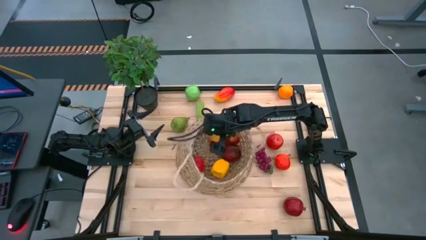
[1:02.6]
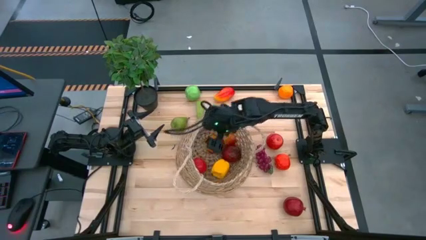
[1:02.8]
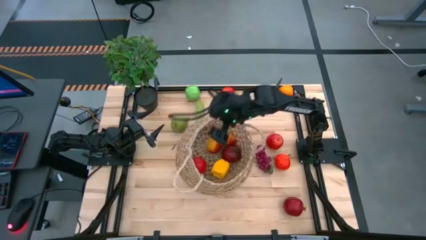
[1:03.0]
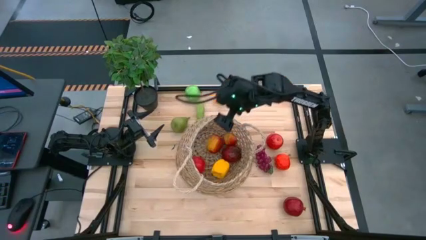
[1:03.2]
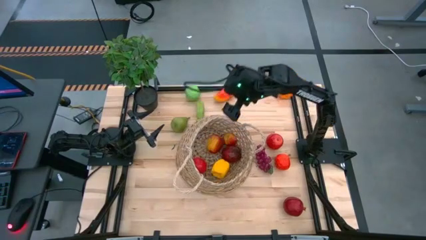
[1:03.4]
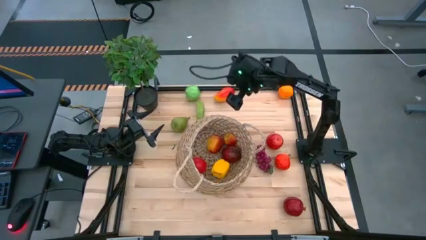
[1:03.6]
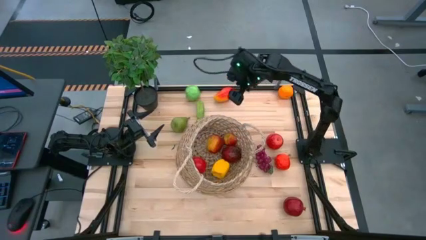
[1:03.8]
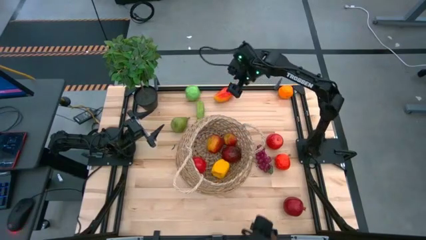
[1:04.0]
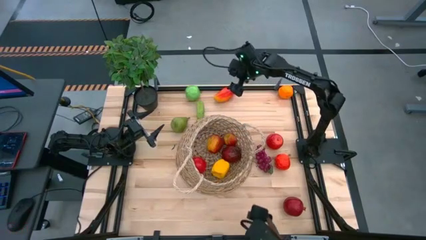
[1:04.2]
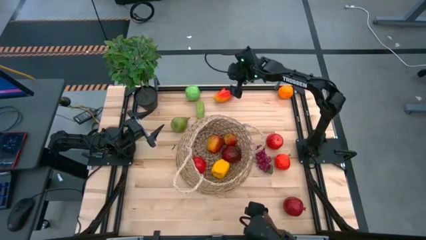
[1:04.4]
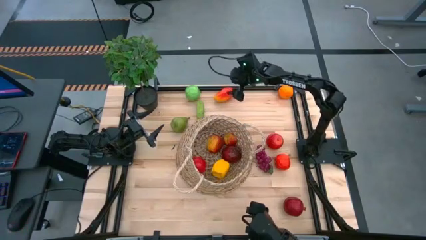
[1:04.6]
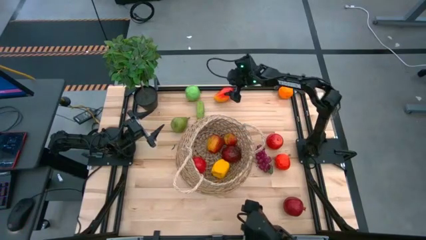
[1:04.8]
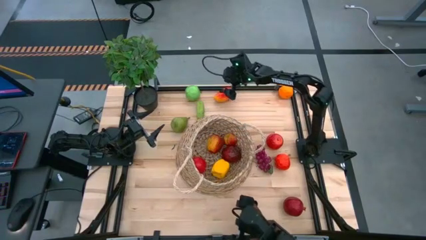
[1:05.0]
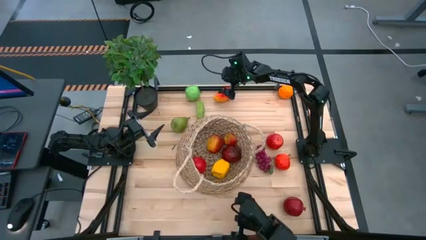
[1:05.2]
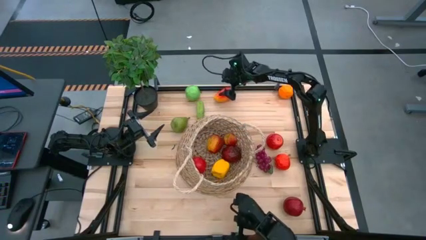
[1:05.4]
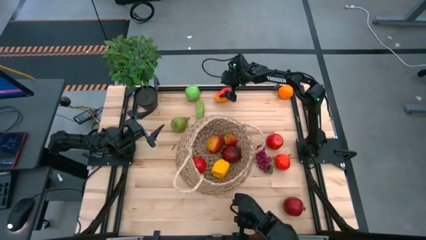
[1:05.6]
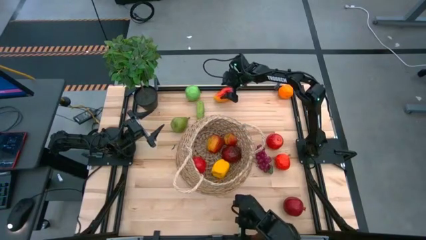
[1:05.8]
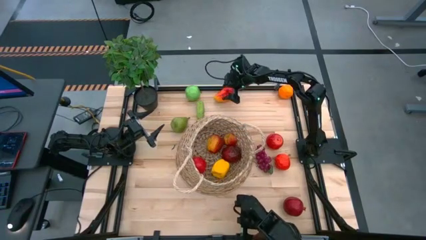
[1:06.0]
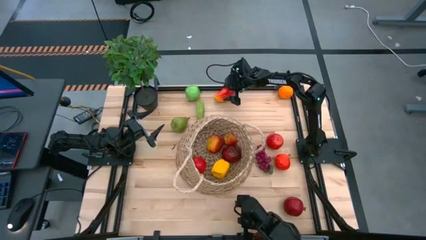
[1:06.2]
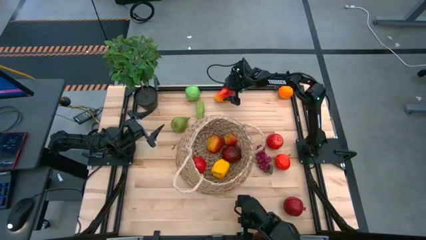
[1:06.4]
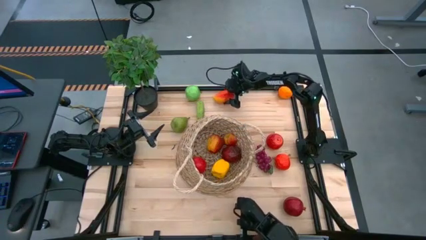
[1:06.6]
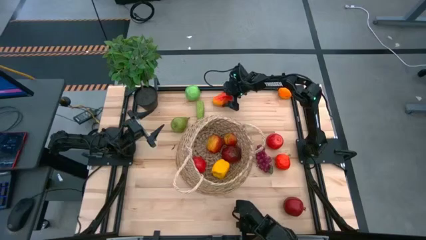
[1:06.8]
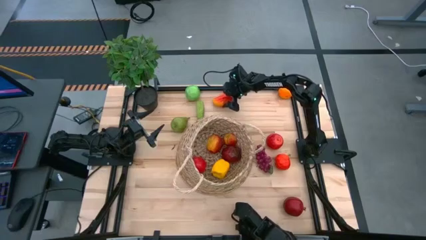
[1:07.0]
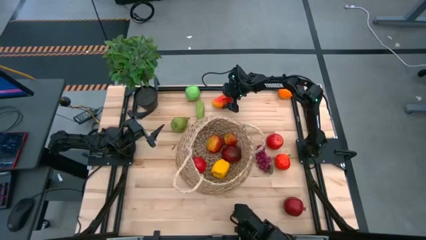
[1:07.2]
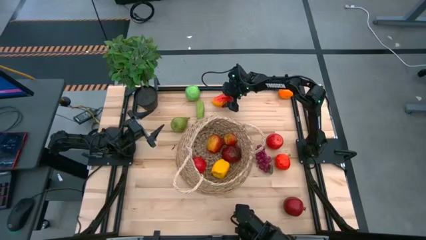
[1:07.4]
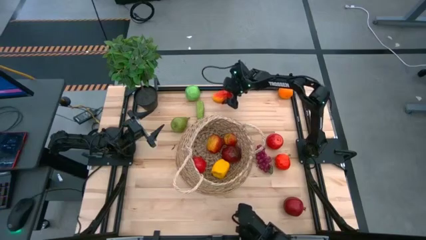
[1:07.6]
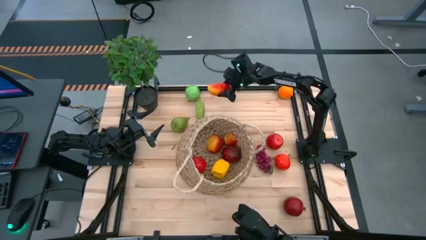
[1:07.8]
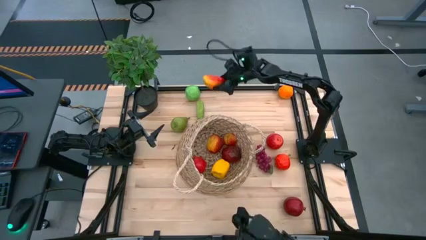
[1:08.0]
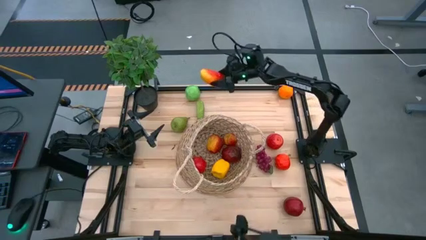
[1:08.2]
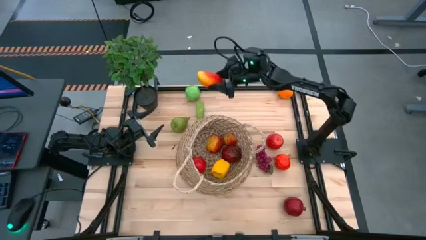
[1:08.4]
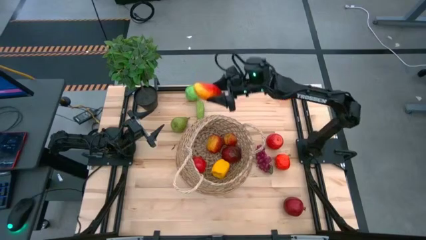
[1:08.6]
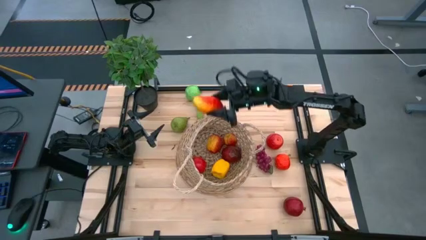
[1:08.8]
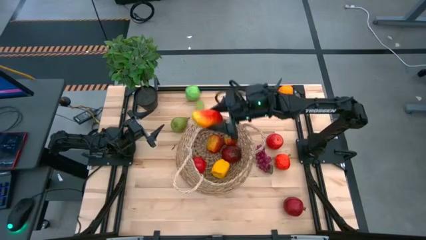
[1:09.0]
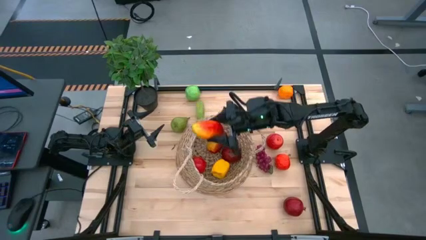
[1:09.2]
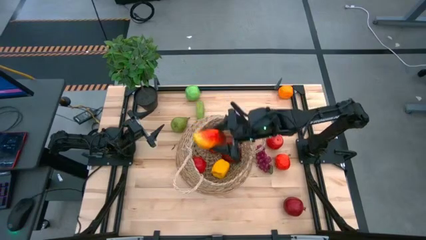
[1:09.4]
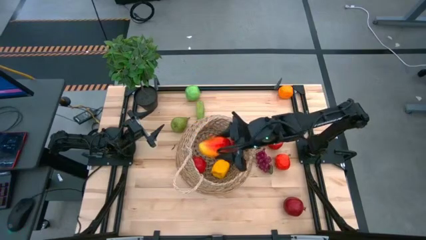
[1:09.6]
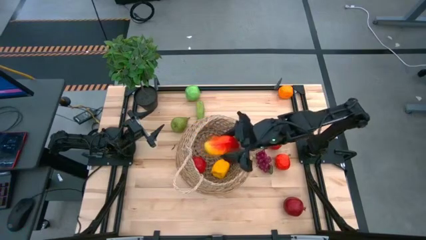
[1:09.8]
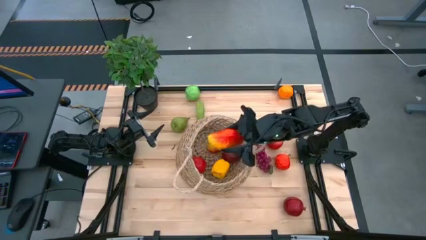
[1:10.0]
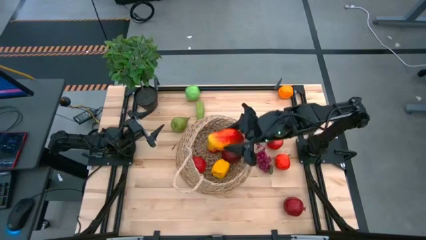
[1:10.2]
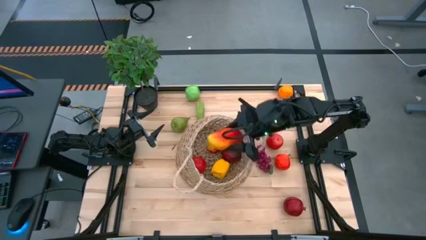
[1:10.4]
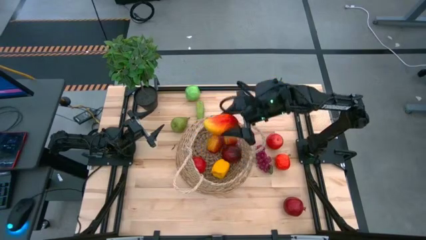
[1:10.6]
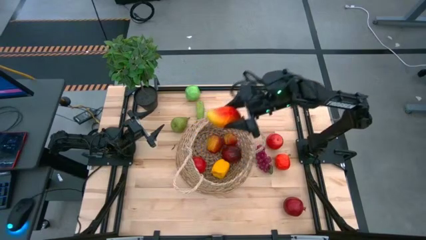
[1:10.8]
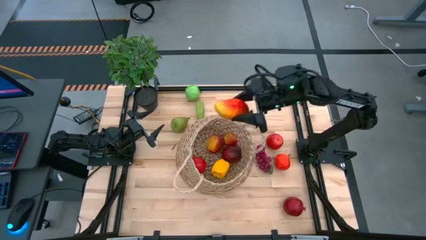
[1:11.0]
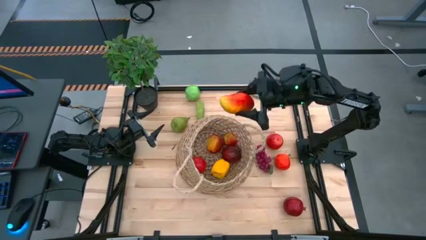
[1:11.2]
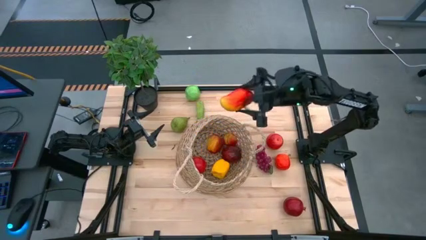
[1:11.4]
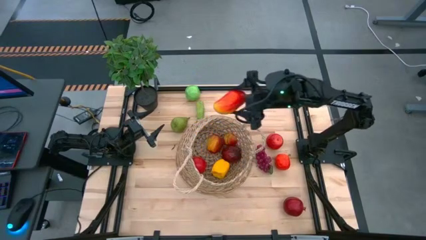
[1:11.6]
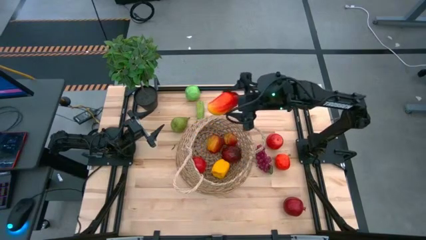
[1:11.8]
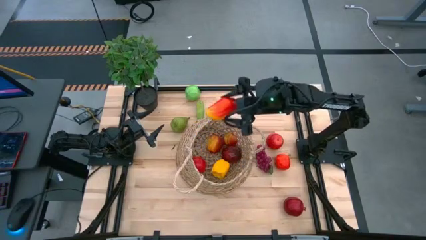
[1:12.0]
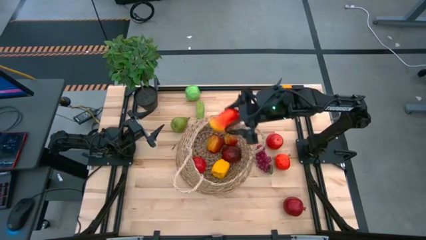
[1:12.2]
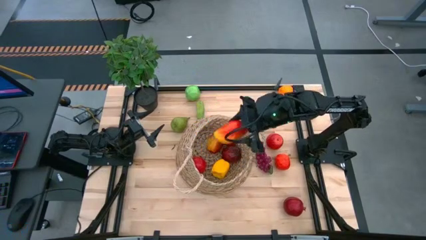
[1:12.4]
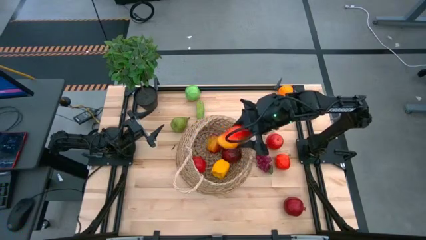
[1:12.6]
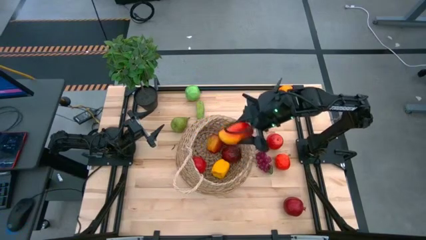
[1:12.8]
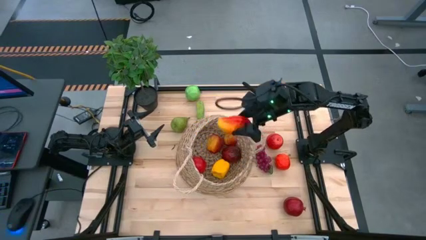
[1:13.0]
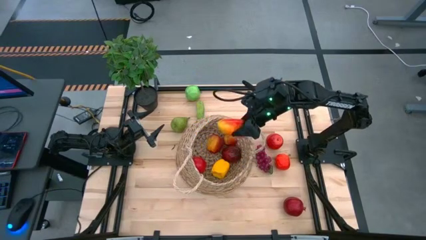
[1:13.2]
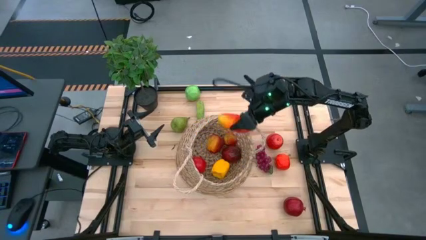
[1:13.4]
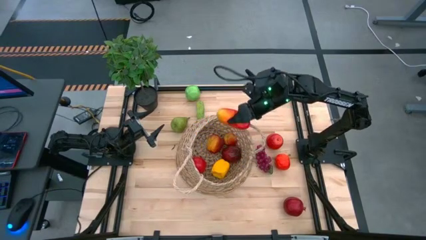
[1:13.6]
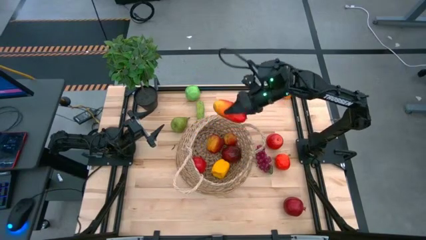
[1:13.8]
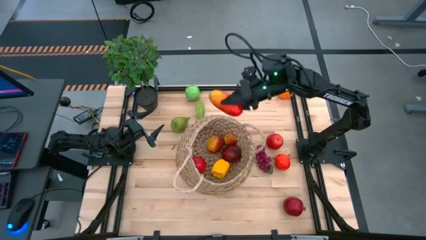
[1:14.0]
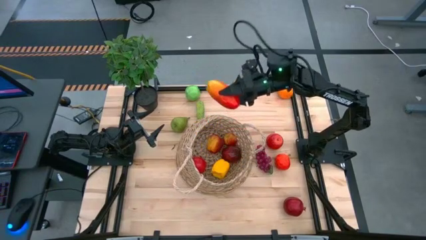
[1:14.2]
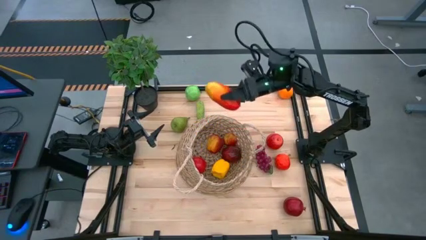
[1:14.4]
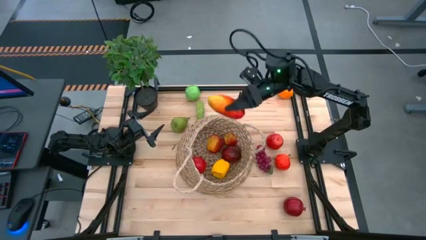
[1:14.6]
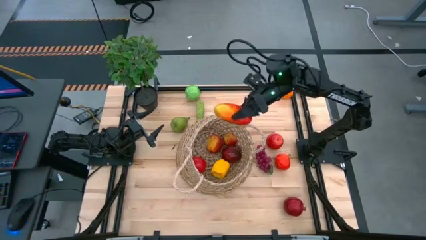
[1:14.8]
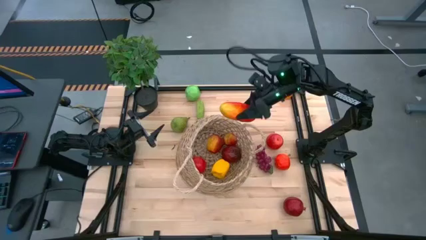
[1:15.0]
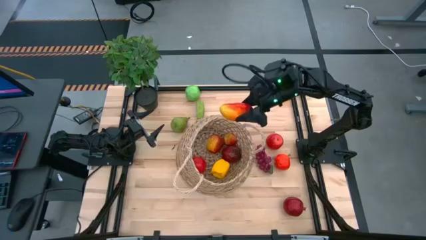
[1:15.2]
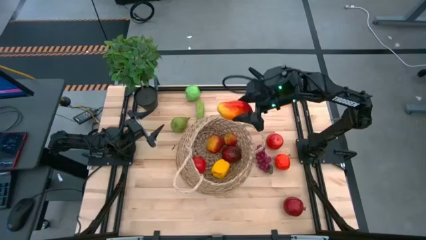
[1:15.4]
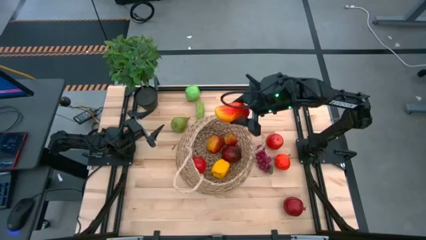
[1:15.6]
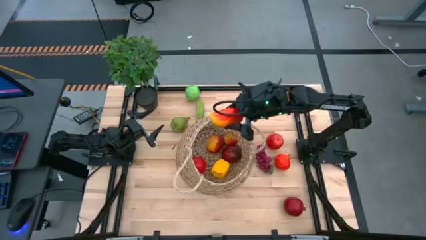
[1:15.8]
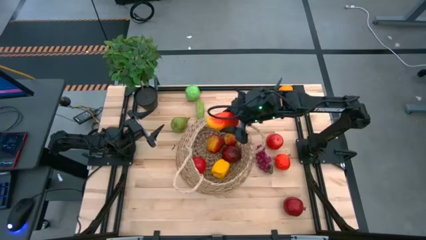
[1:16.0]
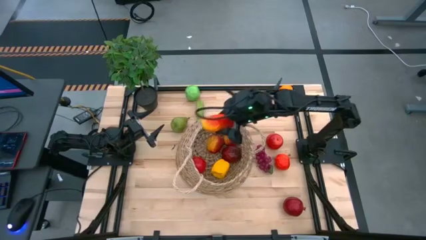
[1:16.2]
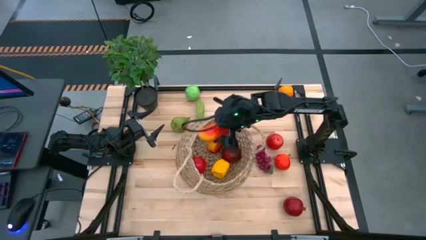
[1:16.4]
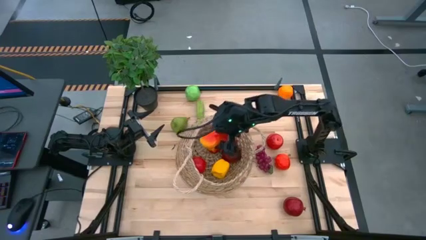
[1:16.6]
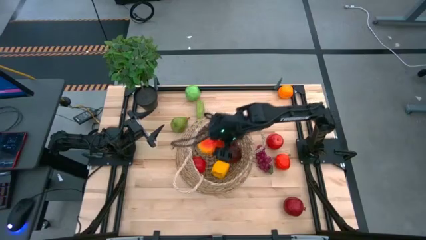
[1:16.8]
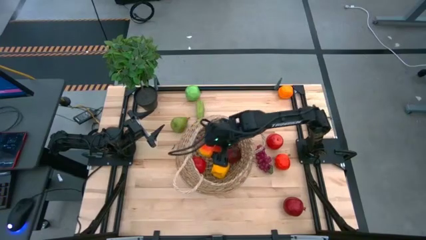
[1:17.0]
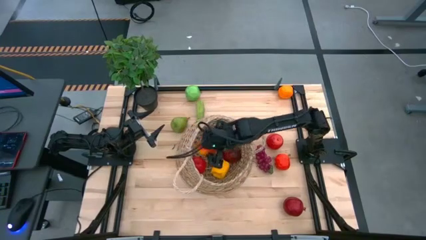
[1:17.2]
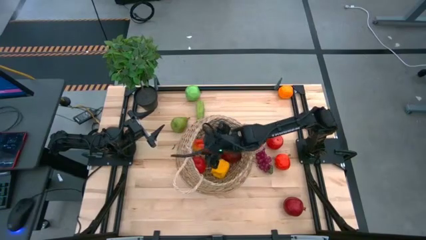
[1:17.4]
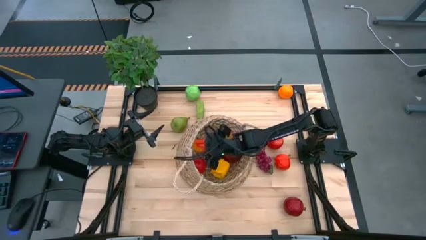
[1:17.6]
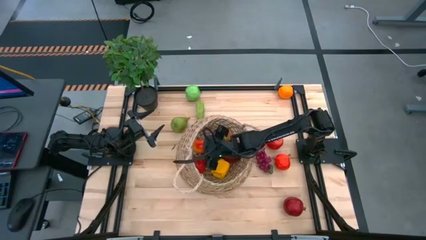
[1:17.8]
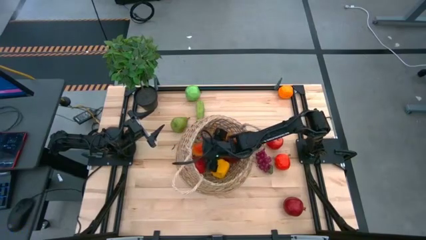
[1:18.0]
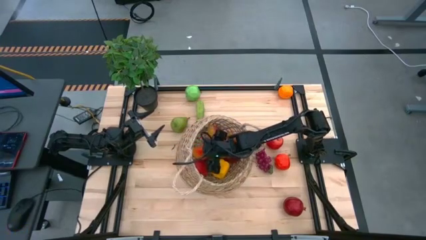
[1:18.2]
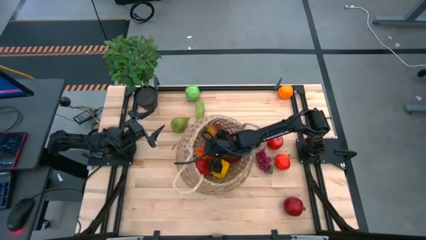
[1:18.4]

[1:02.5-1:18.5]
Task: Build produce basket
Put the mango into the woven basket
